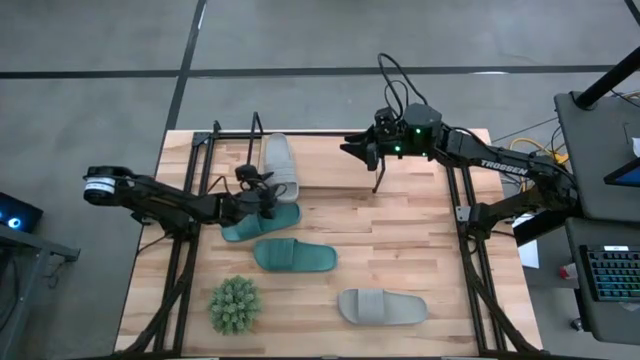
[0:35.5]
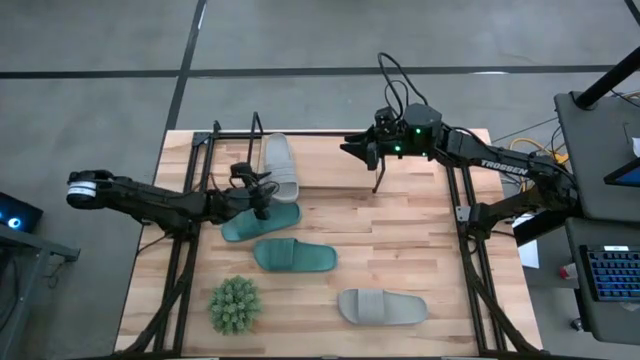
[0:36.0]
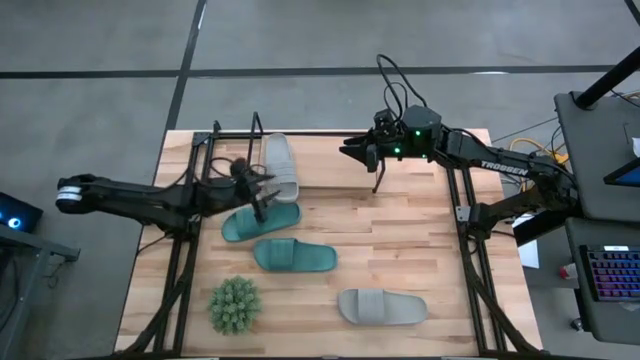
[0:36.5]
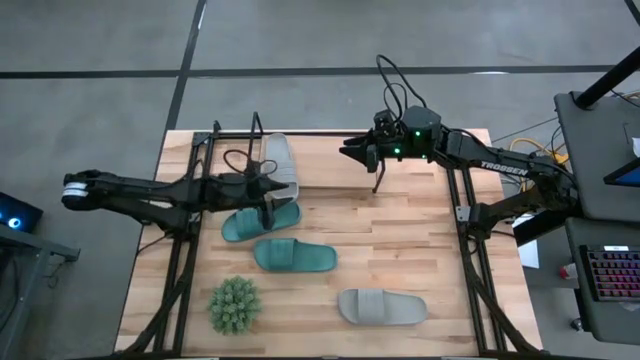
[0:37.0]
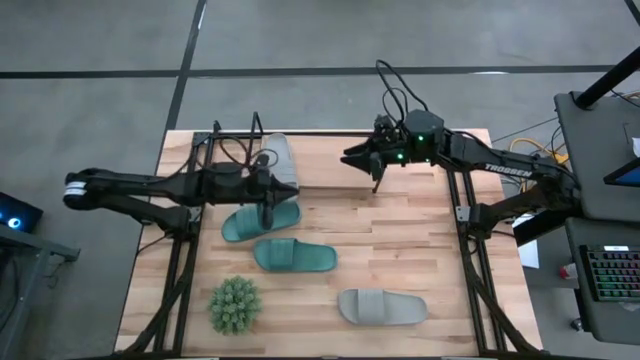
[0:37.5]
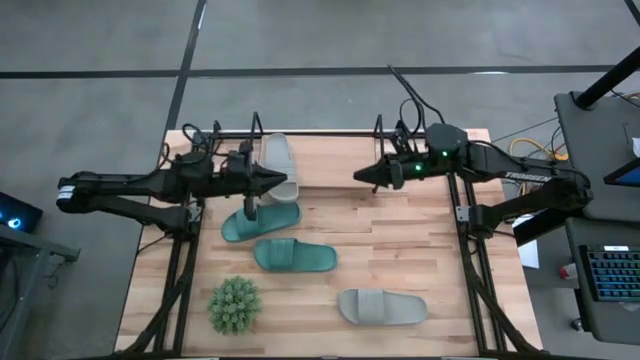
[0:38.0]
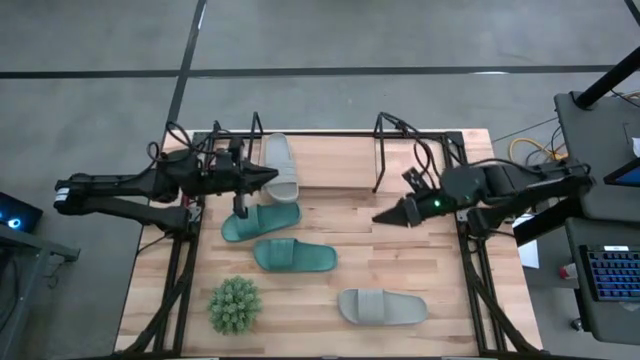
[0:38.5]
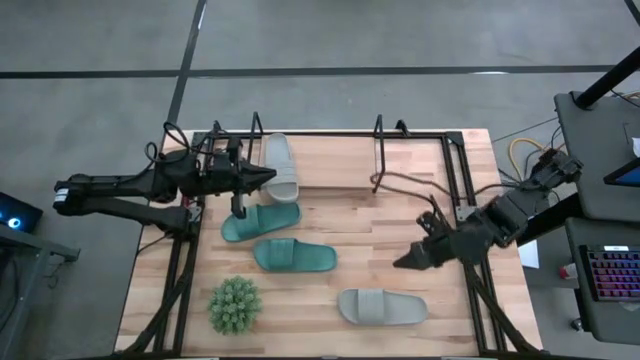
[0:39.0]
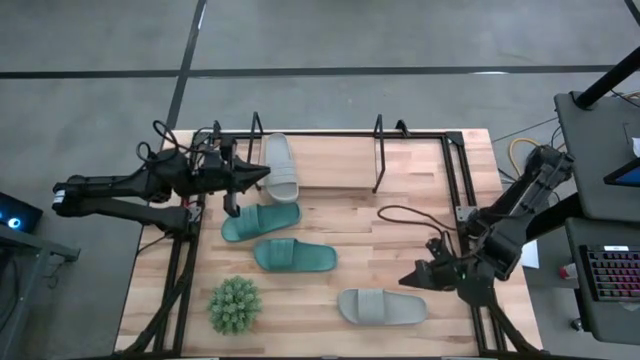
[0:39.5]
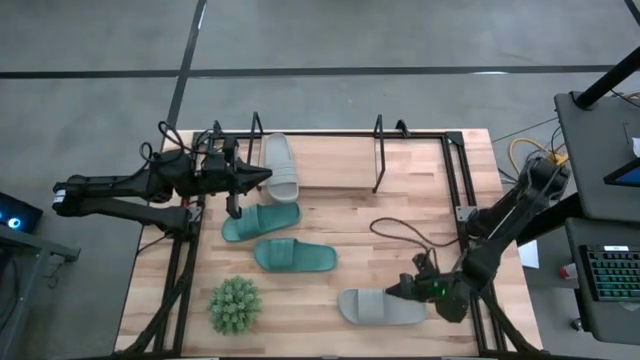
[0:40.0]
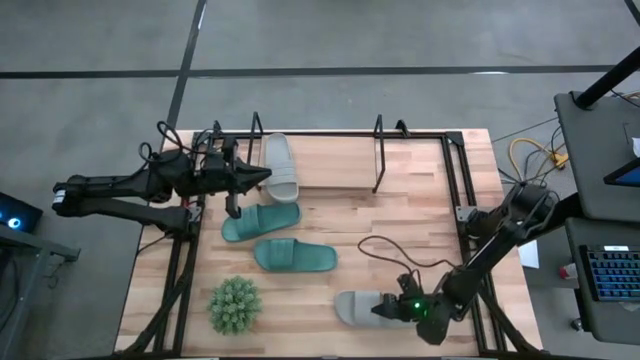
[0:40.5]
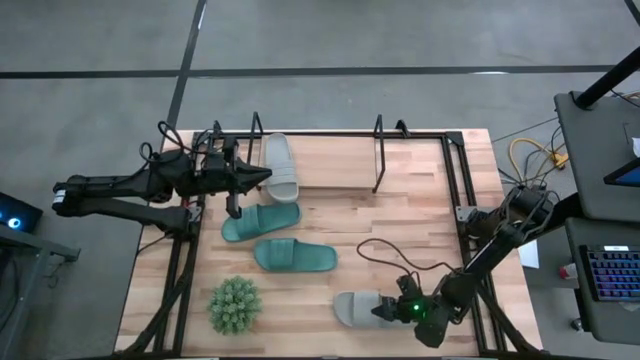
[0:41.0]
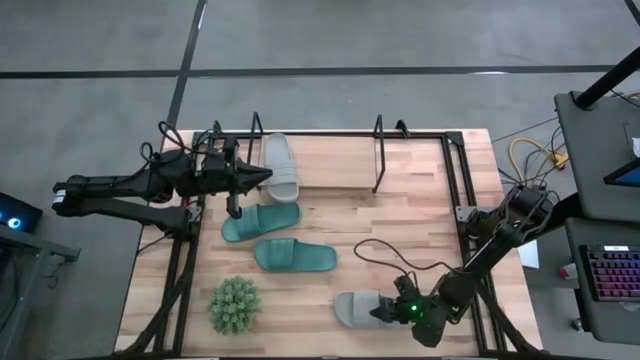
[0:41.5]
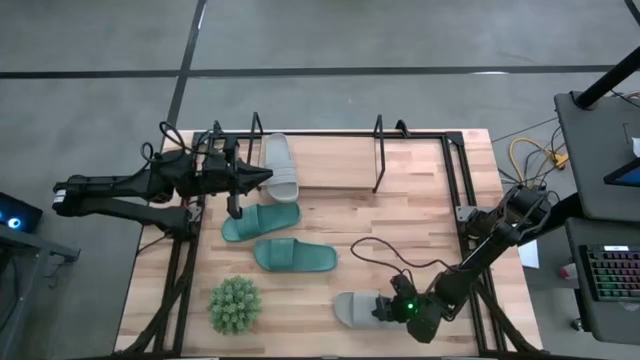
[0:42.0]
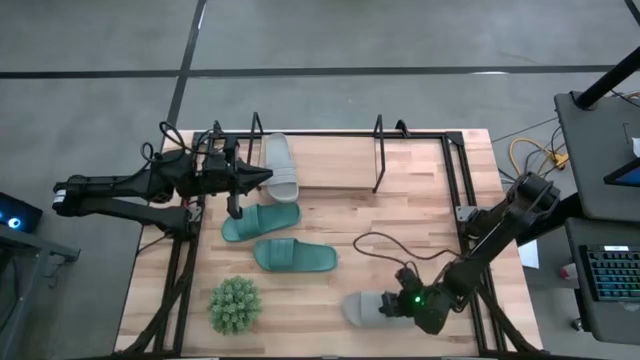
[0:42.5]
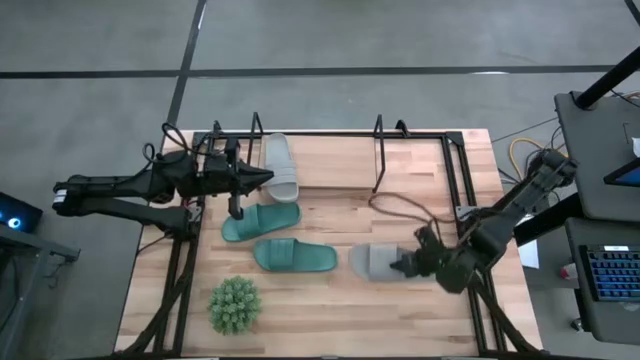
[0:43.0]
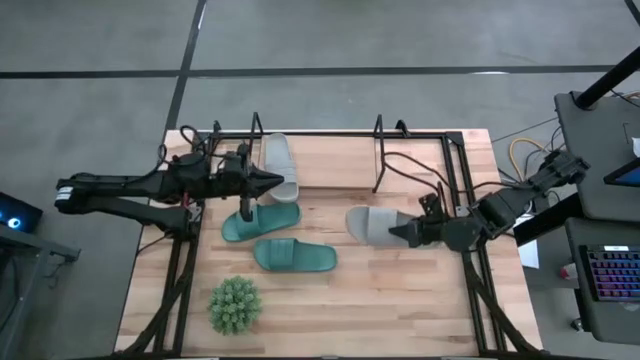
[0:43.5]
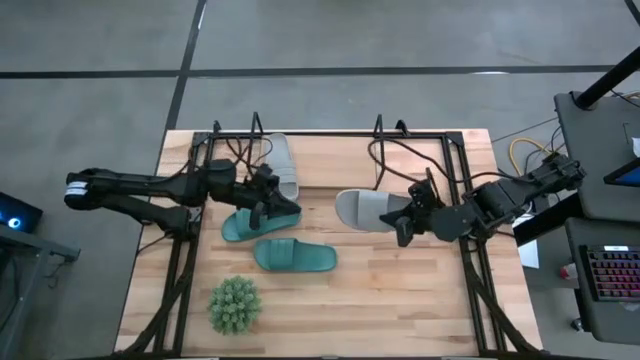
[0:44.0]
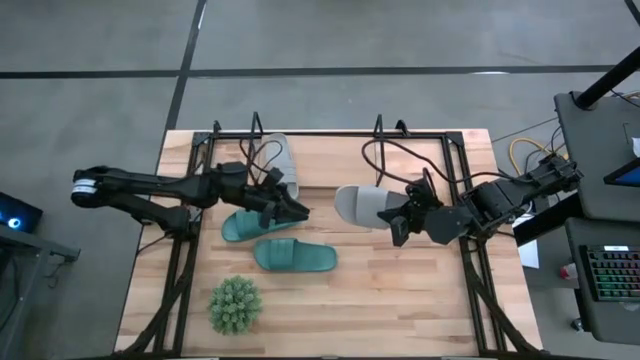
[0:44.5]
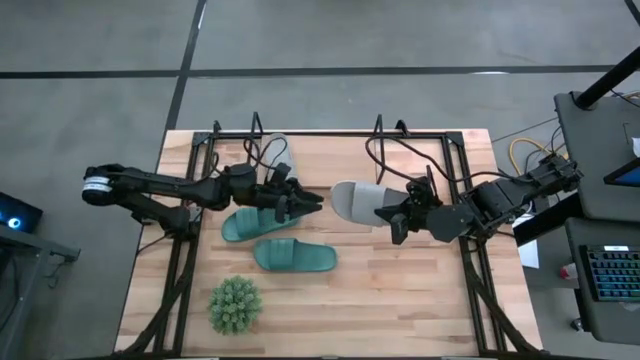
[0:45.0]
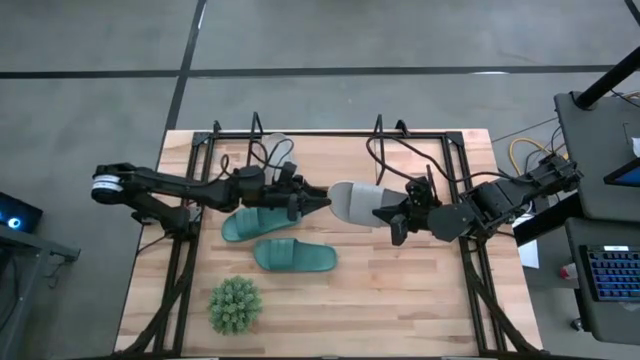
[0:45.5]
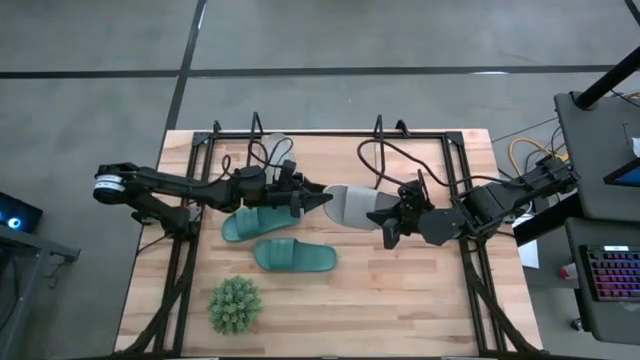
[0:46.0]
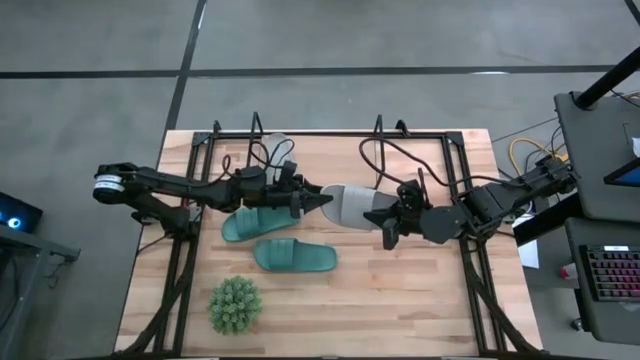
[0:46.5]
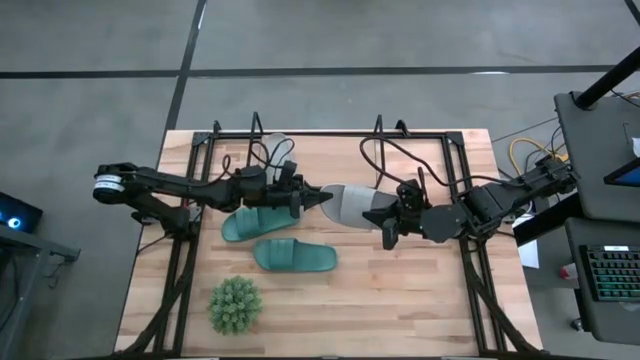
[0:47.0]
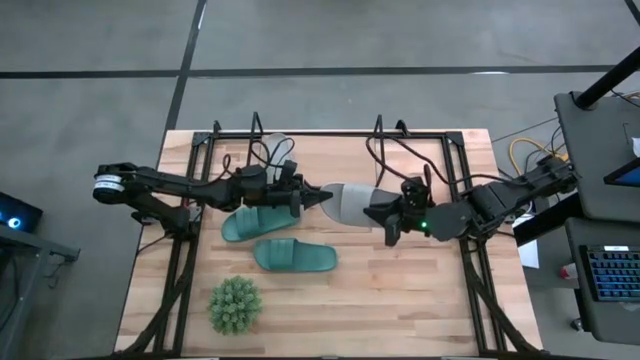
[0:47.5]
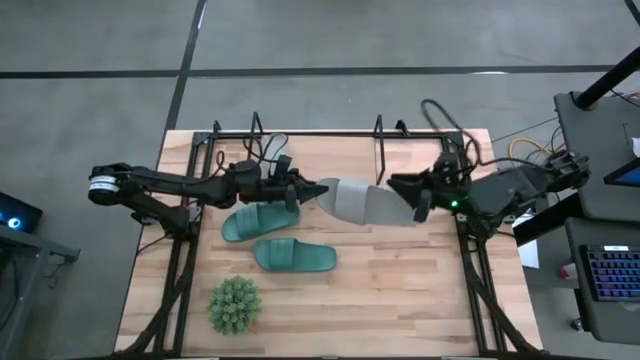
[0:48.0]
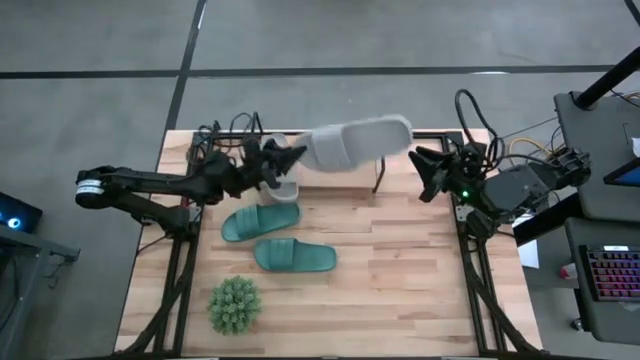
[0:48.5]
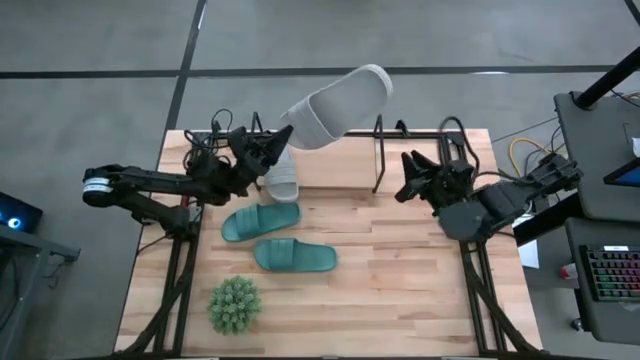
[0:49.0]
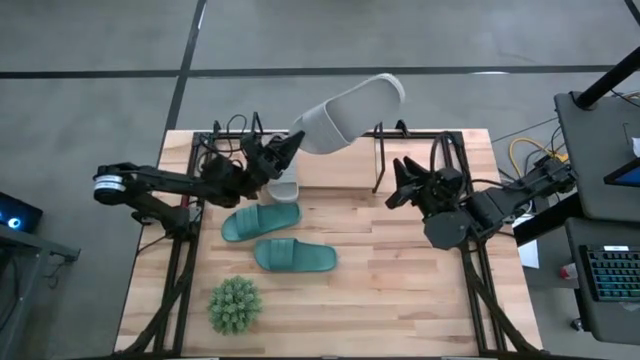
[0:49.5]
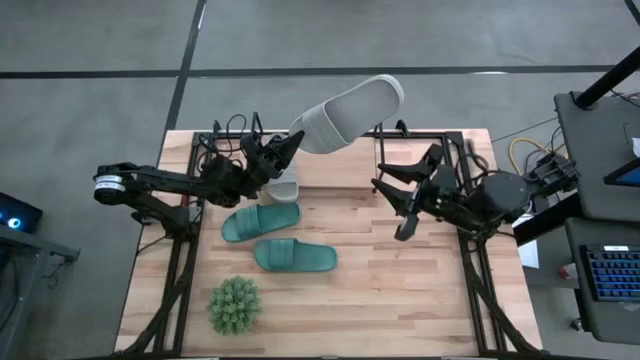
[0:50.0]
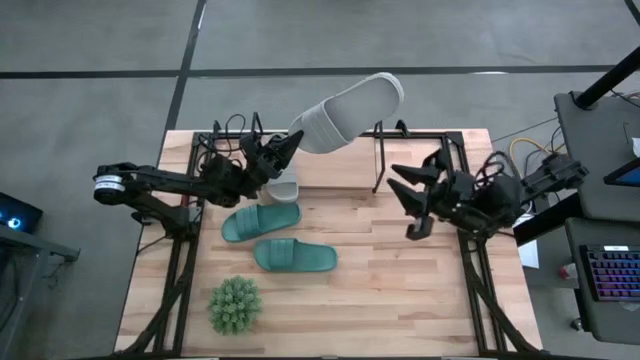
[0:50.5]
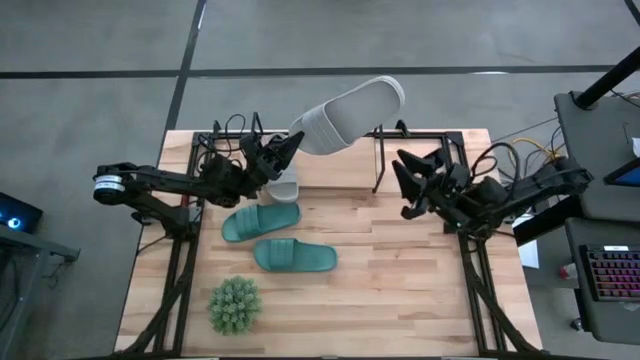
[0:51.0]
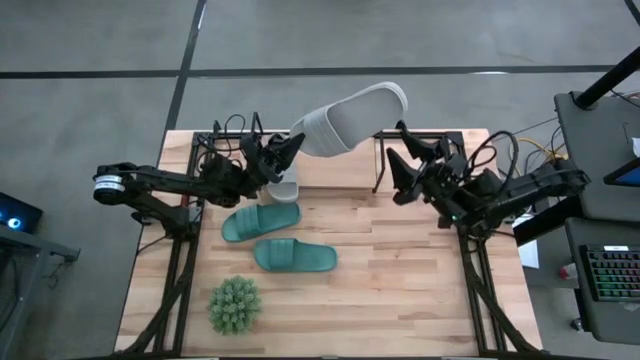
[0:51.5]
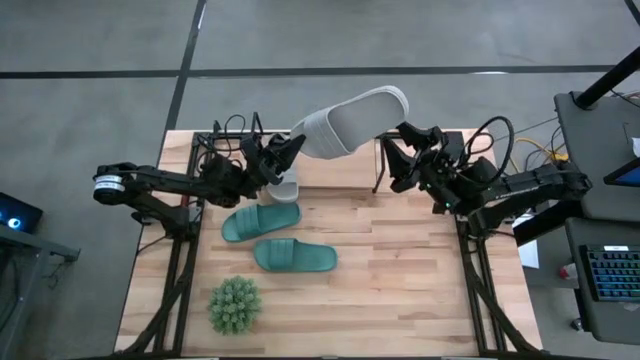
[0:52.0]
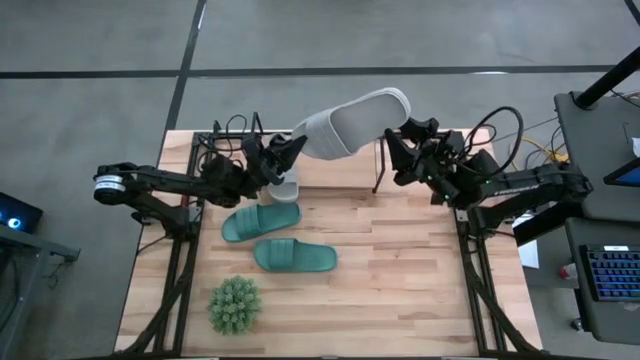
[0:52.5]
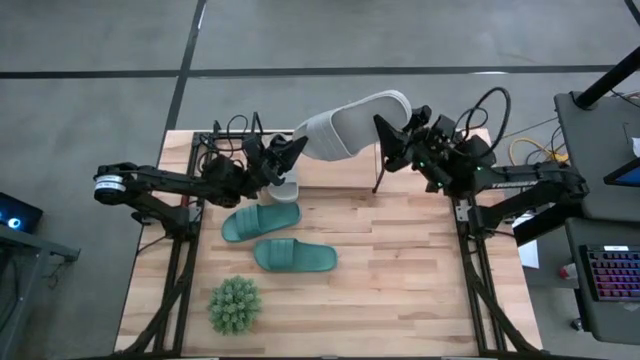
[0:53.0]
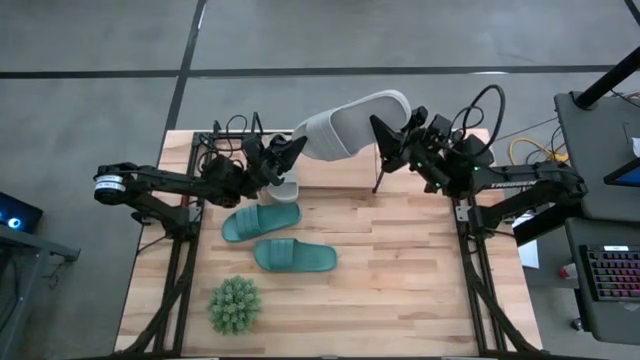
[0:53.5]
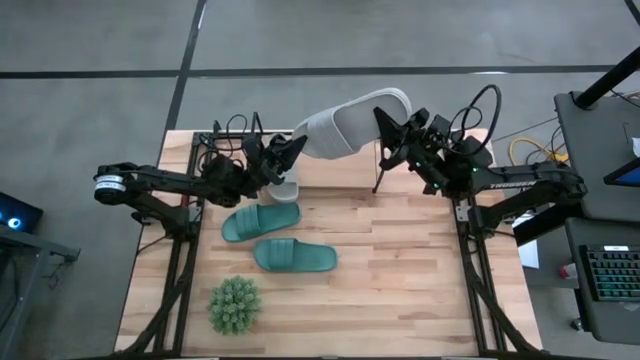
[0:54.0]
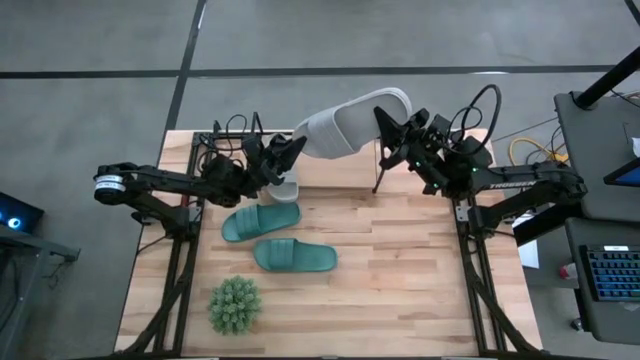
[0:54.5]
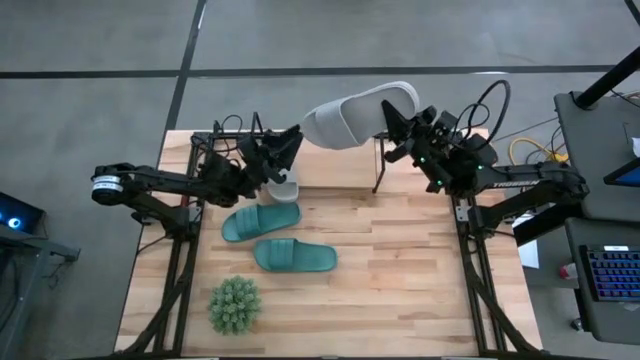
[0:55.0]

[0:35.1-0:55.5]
Task: Pick and place slides into the shelf
Put the gray slipper on the shelf

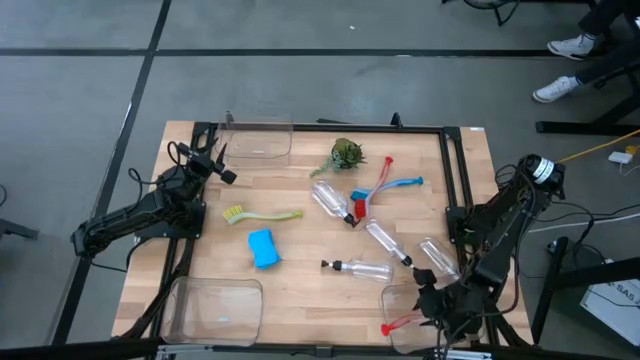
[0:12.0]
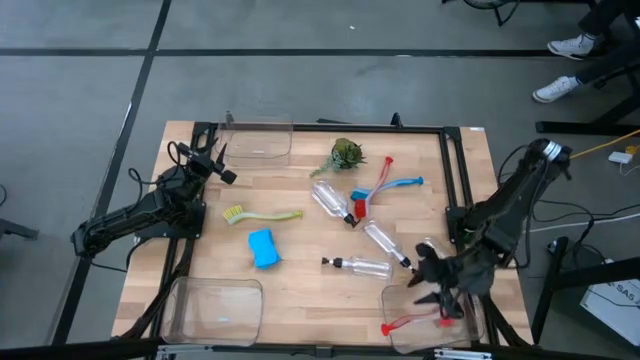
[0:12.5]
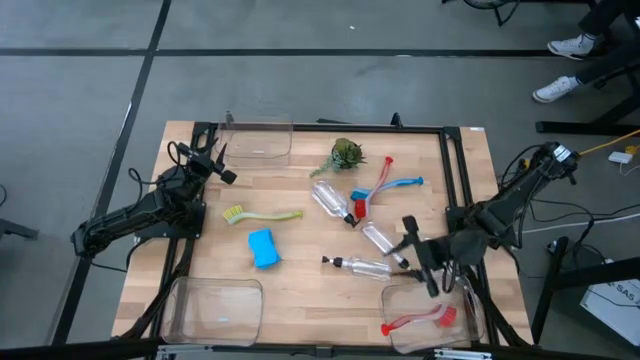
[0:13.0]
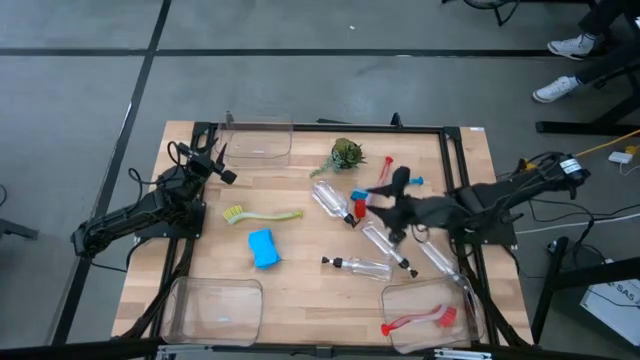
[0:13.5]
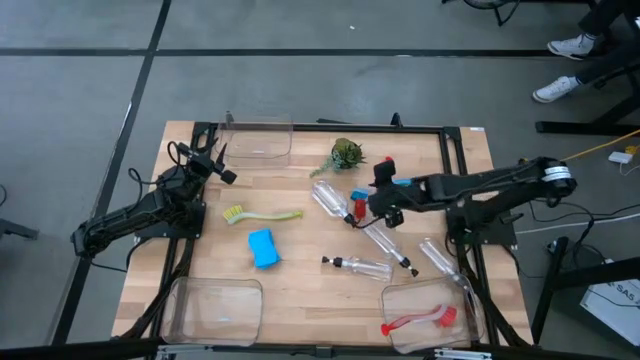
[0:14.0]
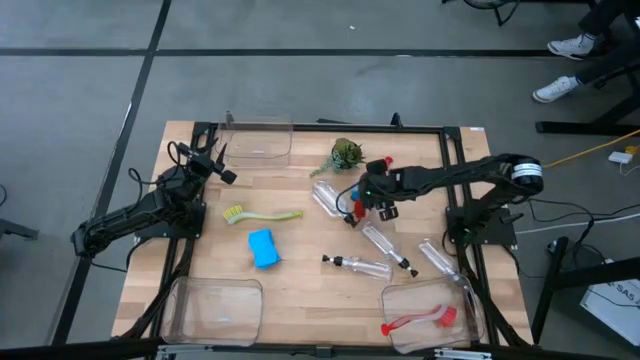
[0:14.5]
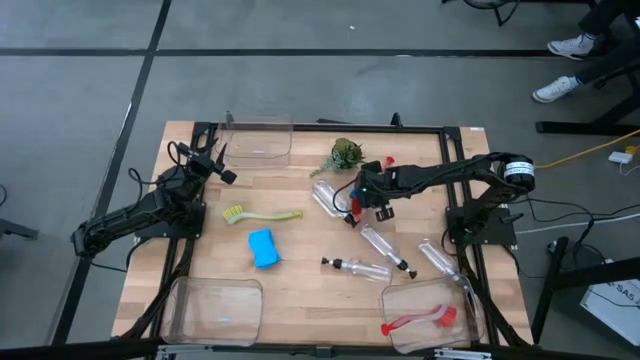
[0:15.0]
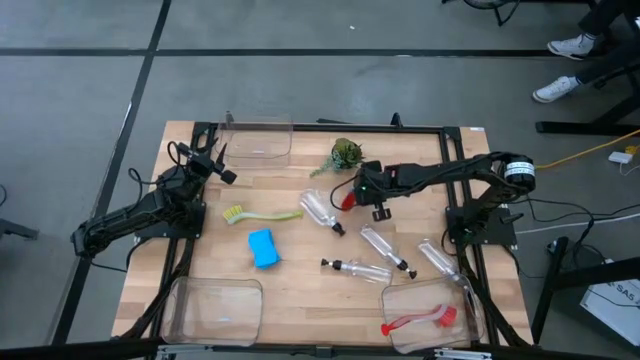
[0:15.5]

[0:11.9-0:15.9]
Task: Pick & Place Kitchen Sink Supplies
Put the red dish brush into the bottom right transparent bin
